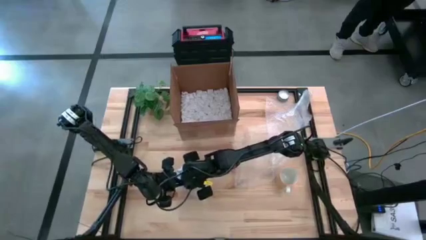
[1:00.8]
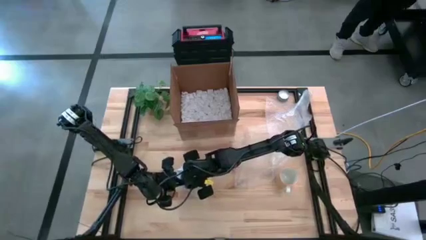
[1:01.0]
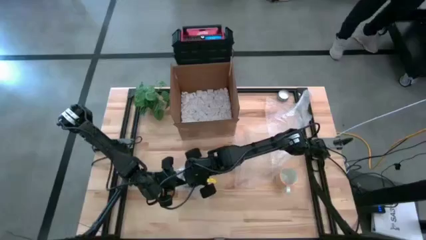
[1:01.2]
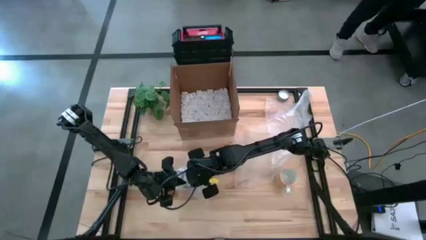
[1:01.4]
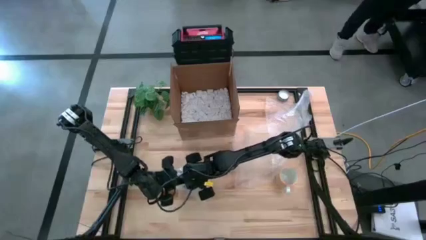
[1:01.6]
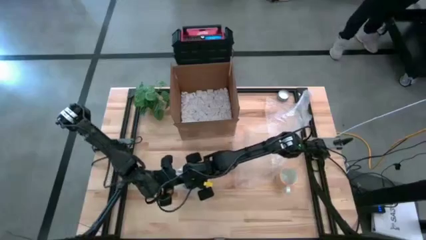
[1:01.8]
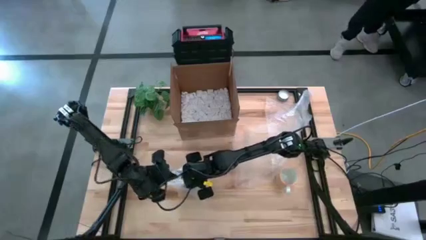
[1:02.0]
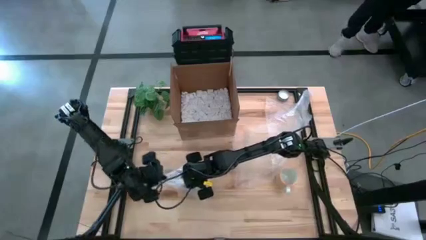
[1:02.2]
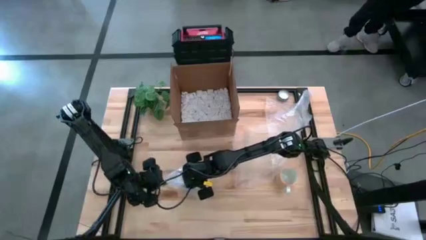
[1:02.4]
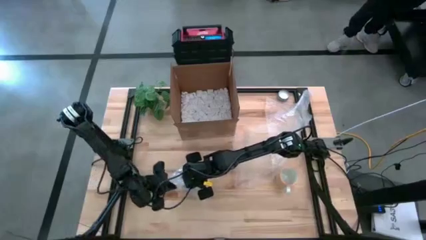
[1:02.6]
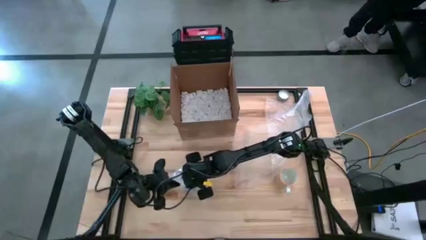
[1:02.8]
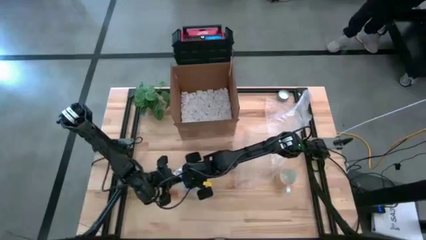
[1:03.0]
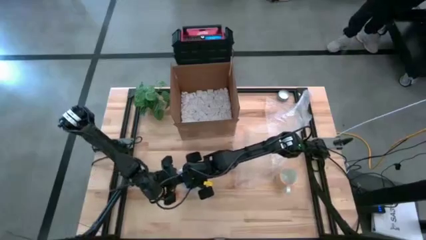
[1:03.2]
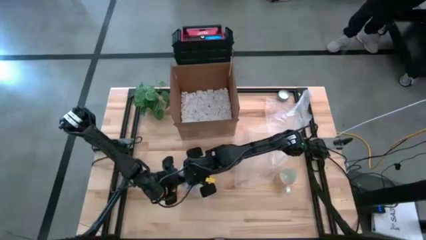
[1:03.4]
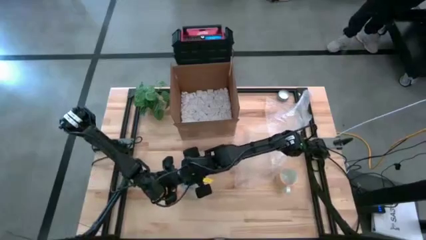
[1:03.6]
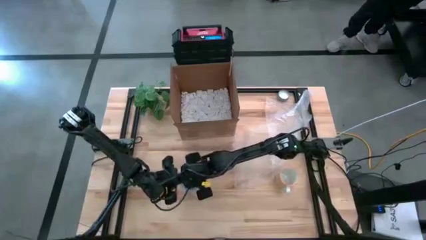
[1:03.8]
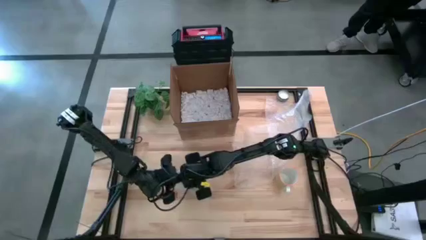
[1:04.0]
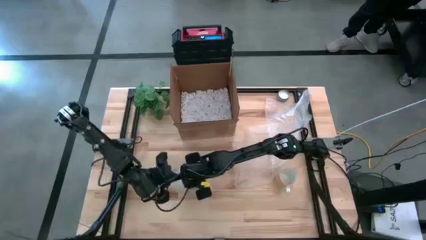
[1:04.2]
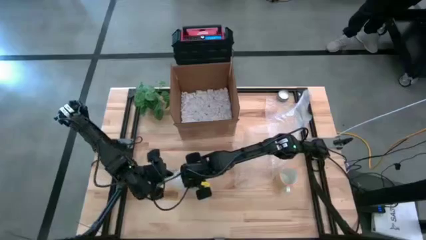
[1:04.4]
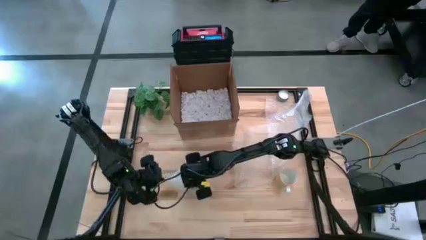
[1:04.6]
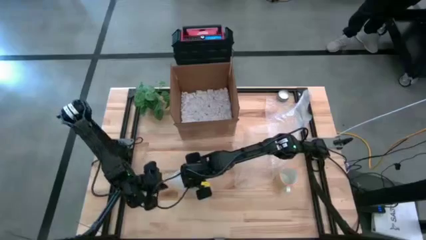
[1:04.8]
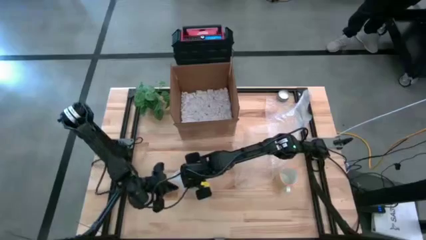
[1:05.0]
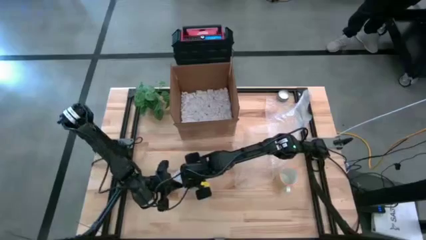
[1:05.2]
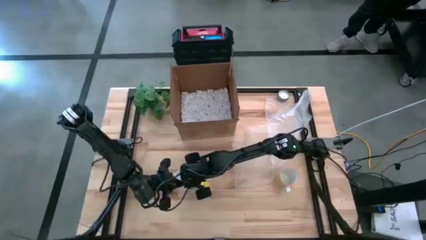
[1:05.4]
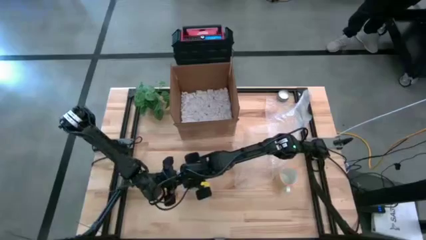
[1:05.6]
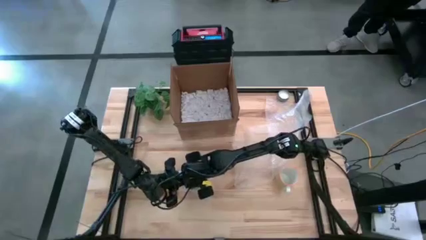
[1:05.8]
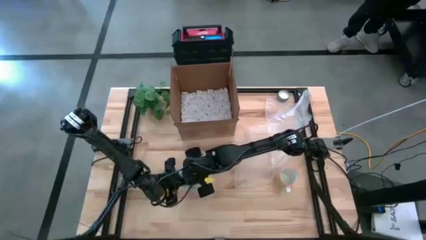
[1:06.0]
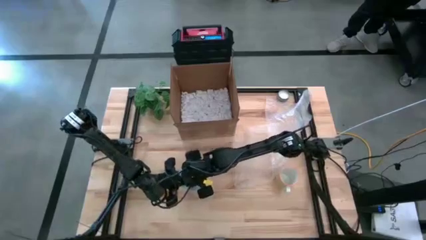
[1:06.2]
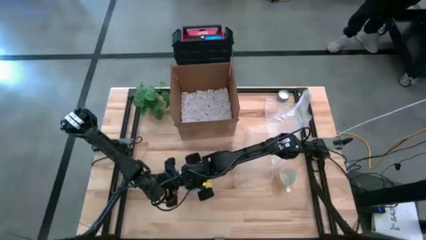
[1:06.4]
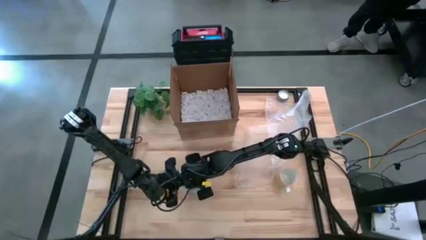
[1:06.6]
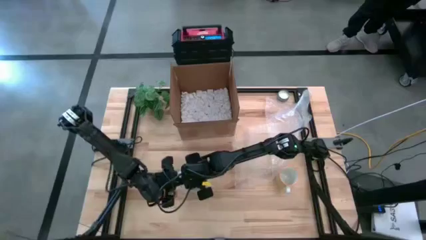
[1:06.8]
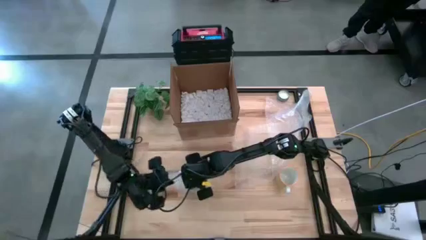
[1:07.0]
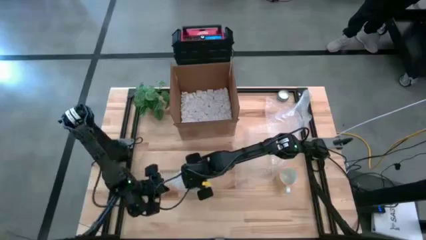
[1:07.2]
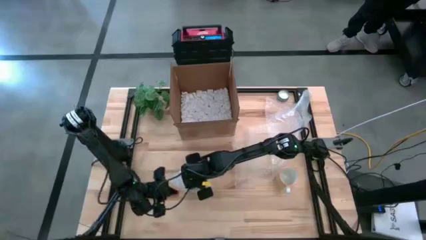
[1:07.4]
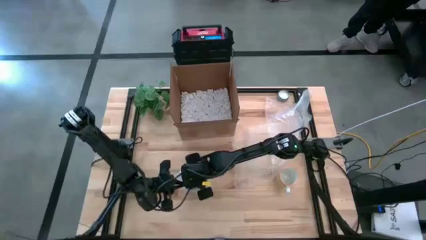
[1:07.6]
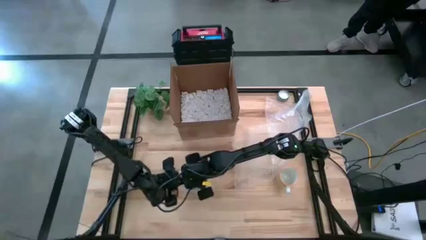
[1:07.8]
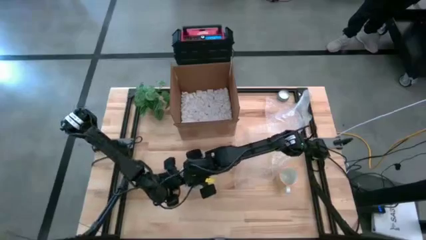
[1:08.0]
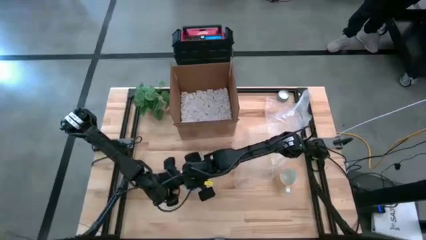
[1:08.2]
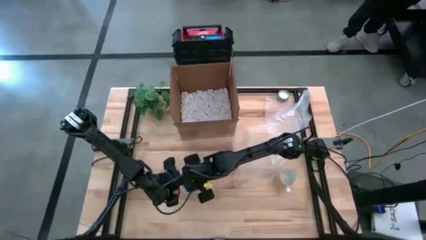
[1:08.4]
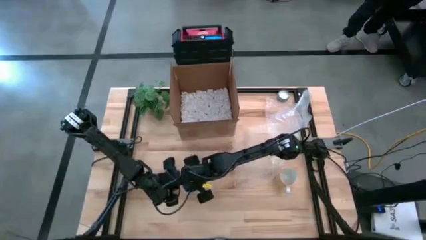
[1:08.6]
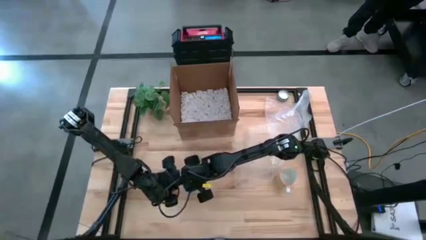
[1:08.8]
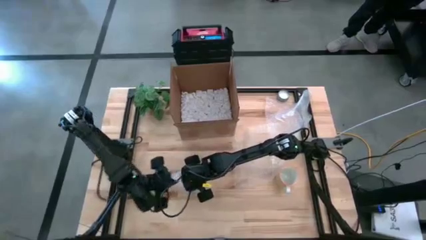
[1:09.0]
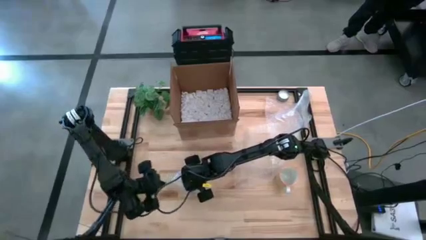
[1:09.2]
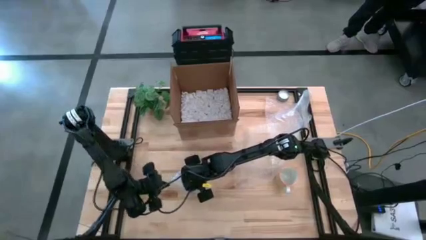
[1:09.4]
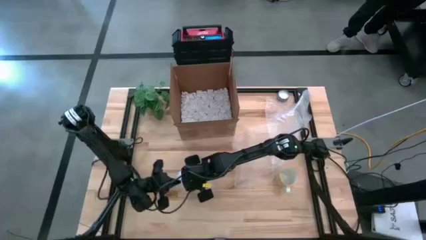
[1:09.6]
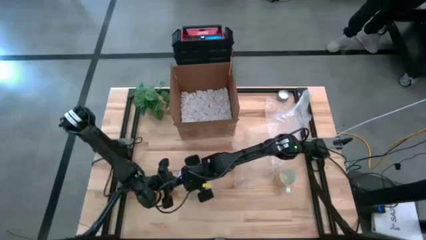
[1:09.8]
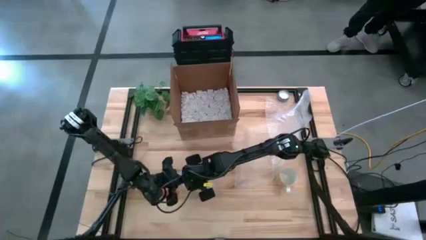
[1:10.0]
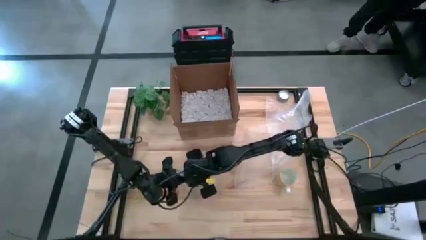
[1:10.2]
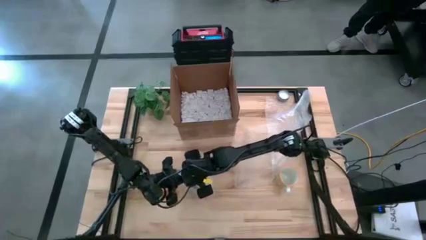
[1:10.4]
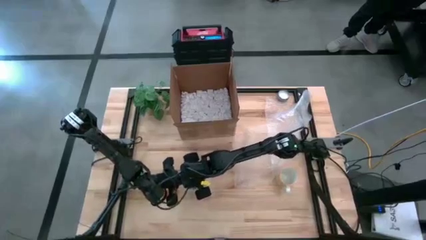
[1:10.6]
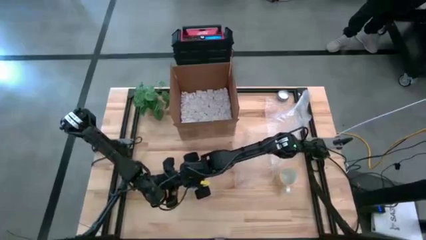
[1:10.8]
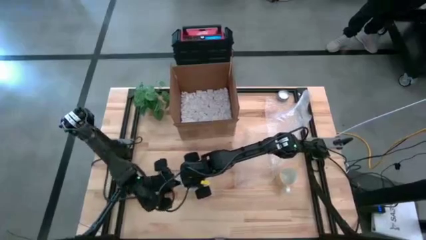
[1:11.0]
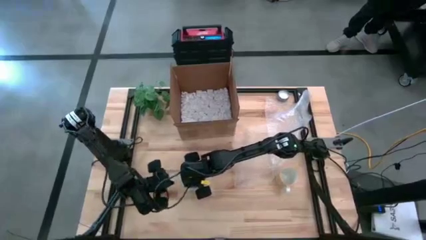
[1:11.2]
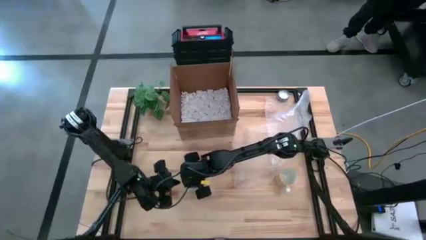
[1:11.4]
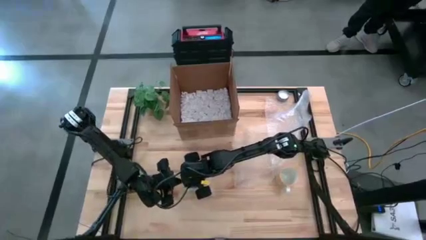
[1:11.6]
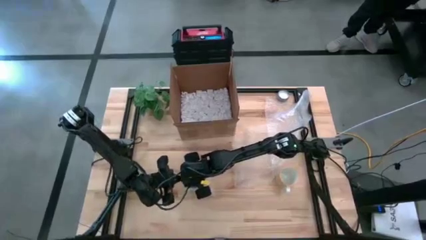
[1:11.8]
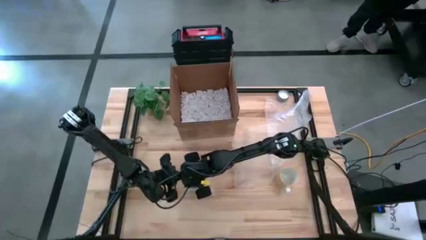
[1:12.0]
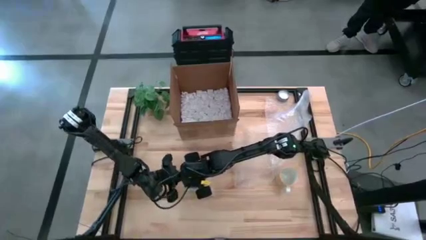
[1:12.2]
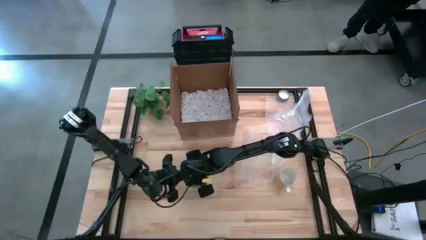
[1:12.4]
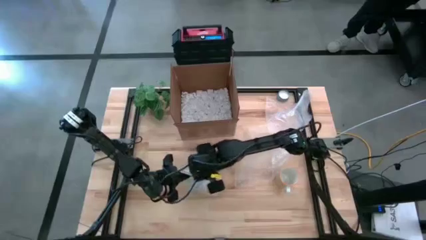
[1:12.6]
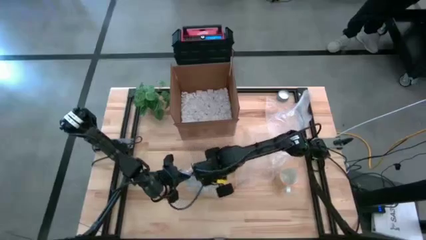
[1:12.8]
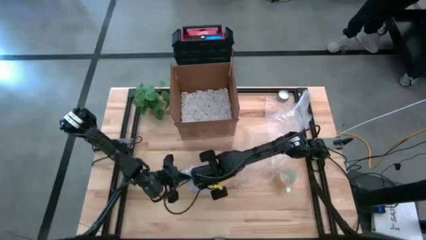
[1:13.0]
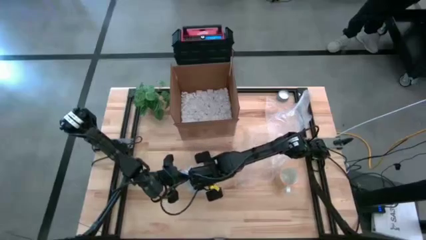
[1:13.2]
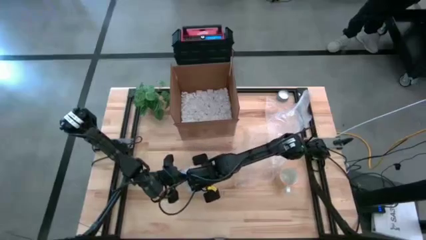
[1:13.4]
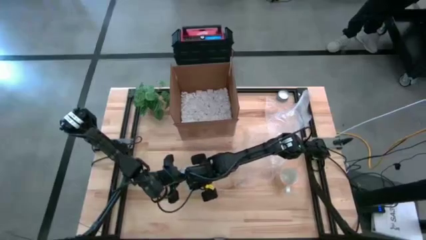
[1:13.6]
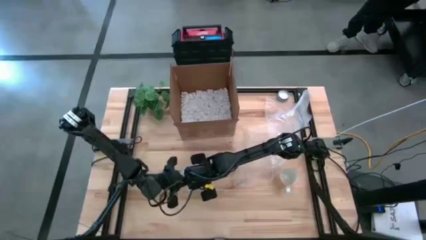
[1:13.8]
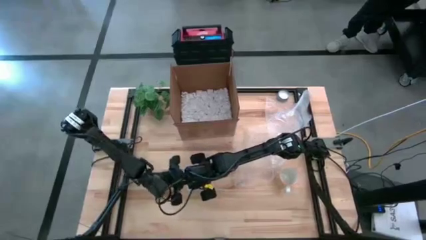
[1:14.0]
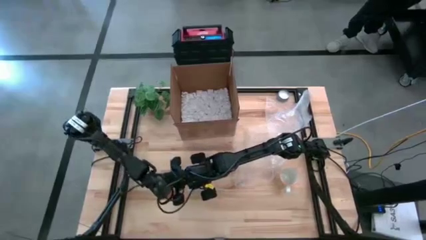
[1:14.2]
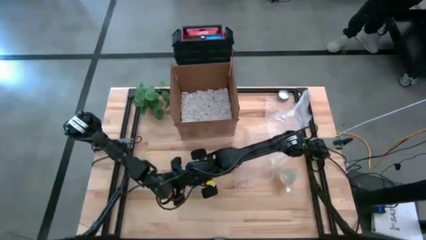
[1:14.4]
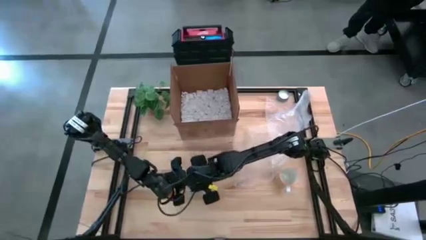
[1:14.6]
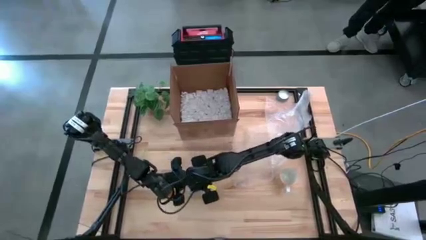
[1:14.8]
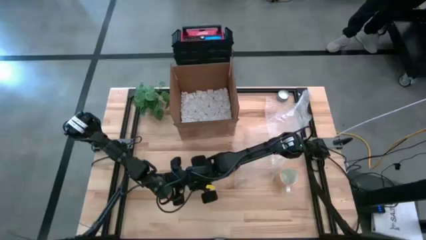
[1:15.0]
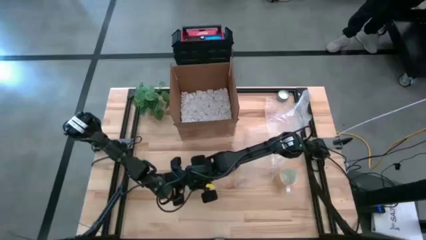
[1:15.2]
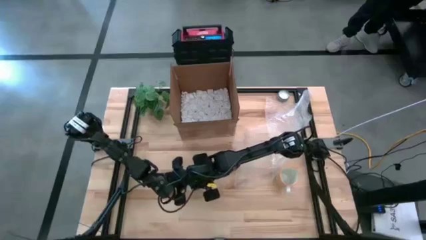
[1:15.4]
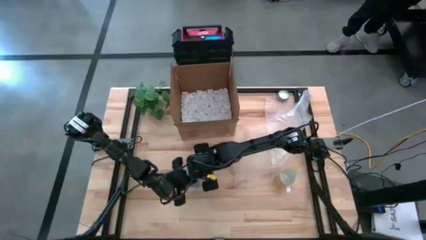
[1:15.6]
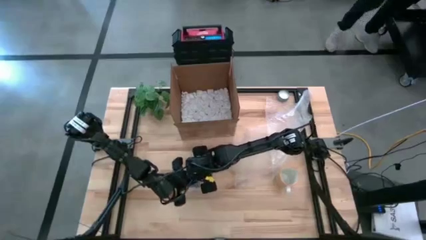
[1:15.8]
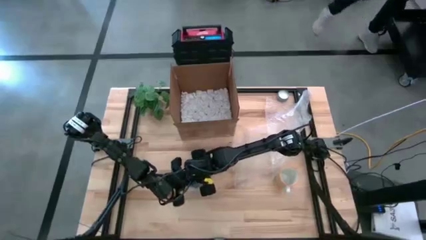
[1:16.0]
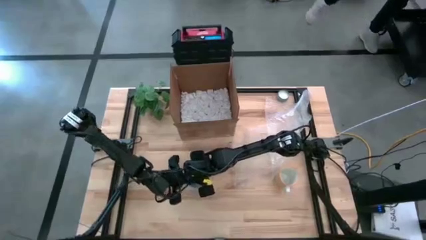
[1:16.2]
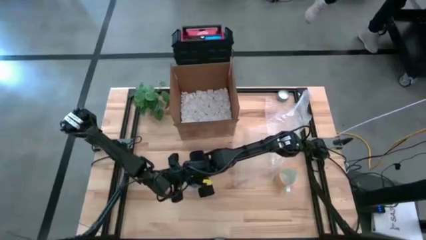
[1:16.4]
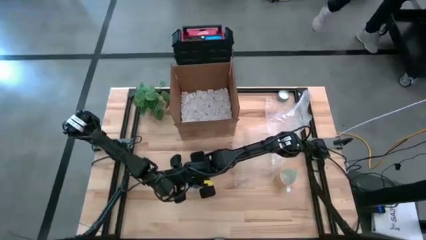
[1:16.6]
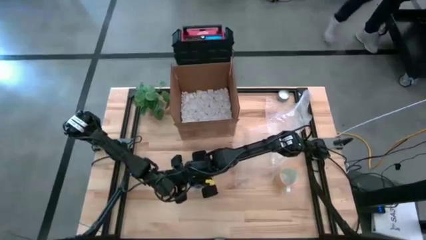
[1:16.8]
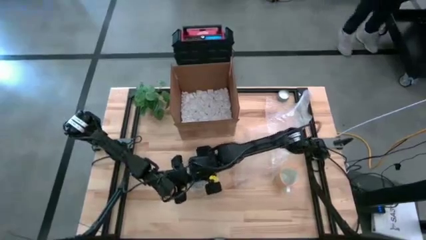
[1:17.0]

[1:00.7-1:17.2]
Task: wrap mug
Wrap the blue mug using the left bubble wrap
